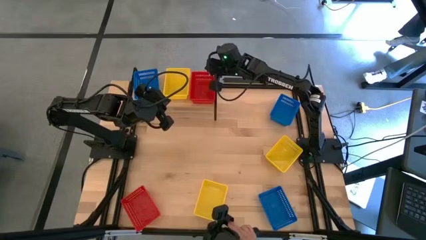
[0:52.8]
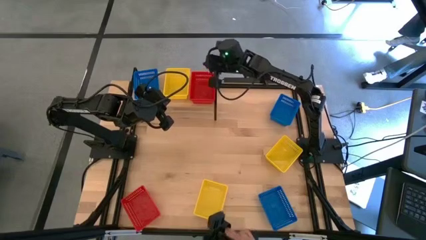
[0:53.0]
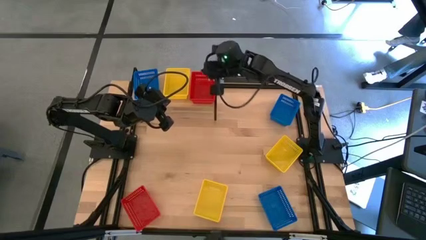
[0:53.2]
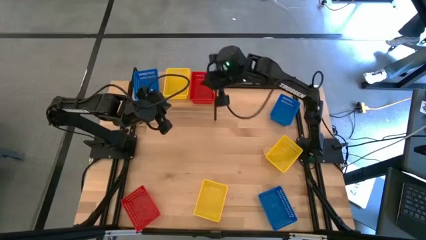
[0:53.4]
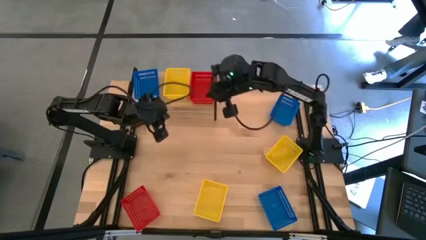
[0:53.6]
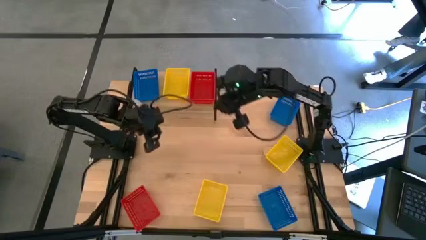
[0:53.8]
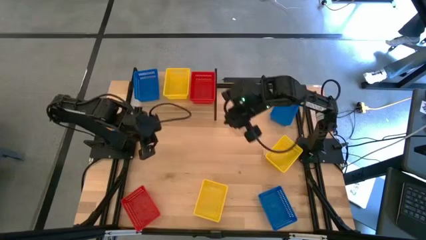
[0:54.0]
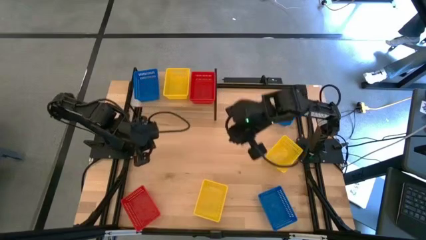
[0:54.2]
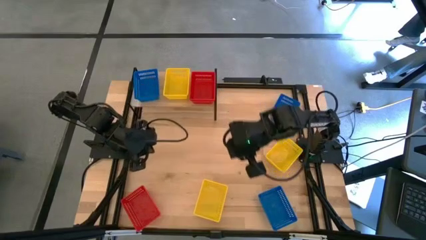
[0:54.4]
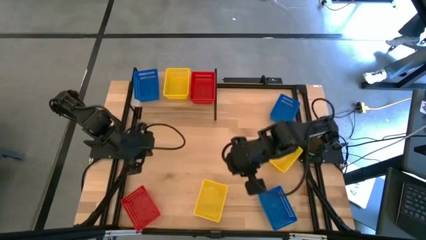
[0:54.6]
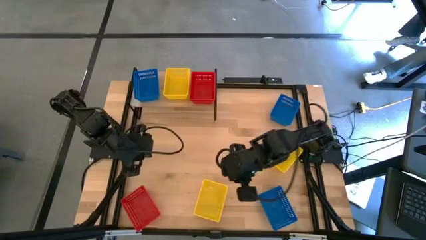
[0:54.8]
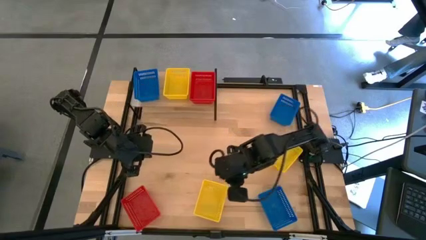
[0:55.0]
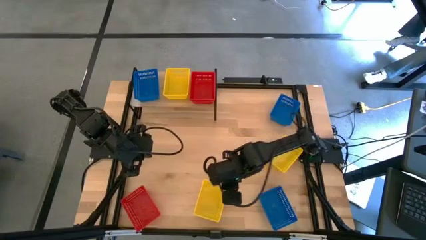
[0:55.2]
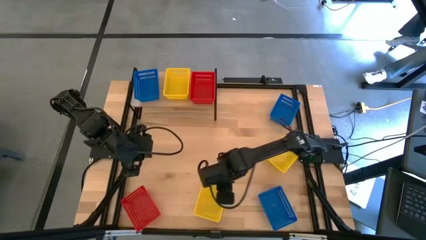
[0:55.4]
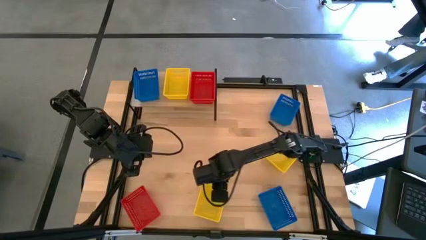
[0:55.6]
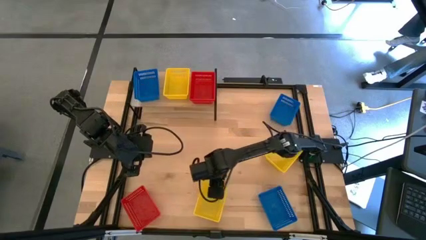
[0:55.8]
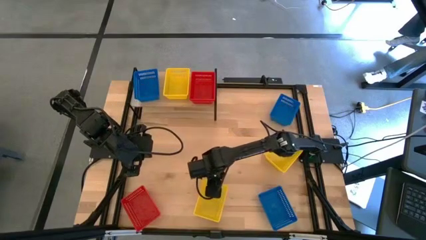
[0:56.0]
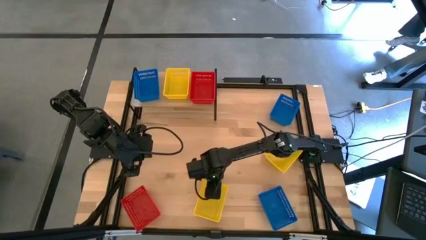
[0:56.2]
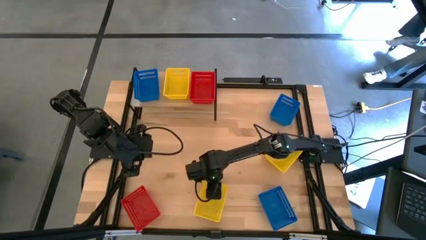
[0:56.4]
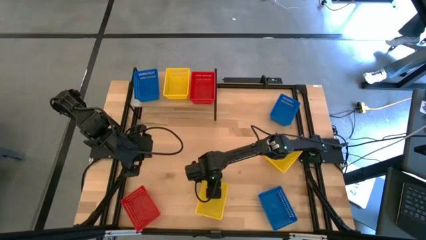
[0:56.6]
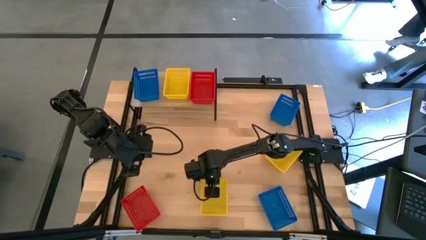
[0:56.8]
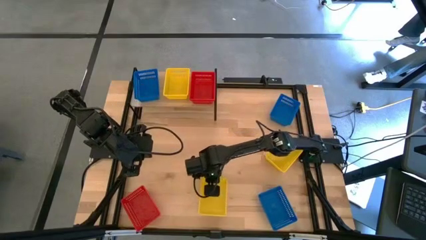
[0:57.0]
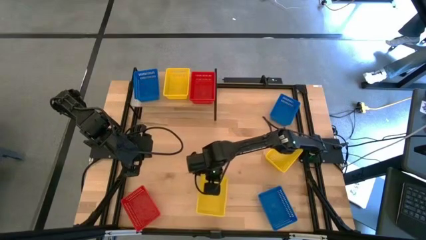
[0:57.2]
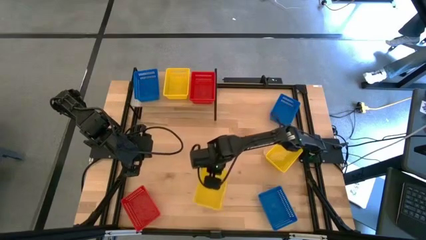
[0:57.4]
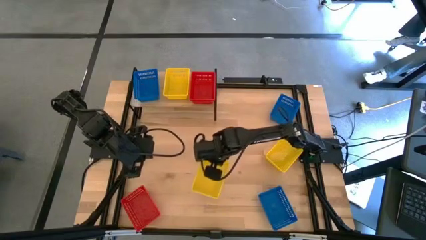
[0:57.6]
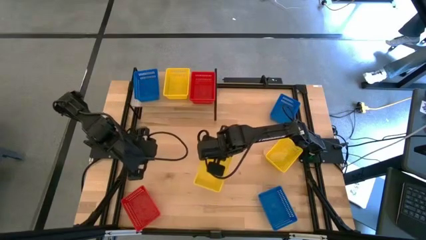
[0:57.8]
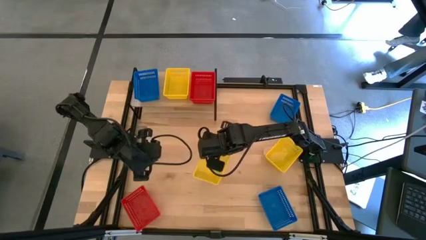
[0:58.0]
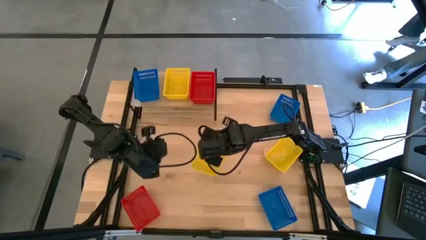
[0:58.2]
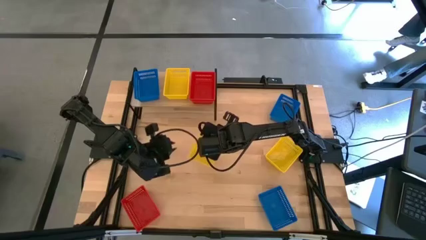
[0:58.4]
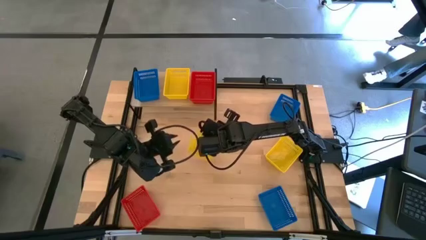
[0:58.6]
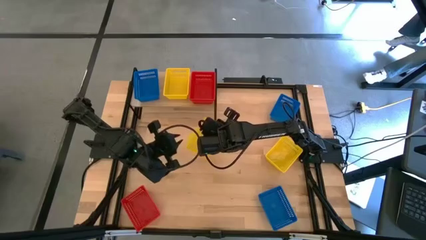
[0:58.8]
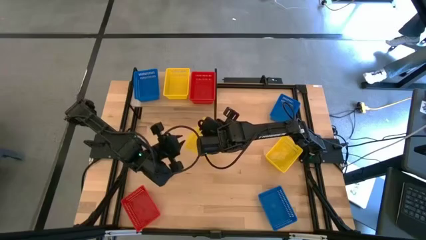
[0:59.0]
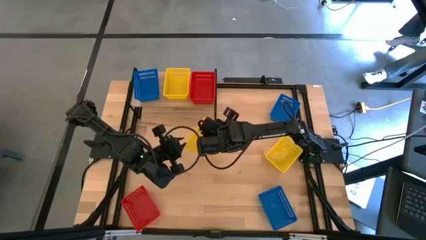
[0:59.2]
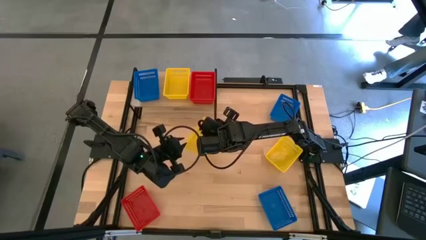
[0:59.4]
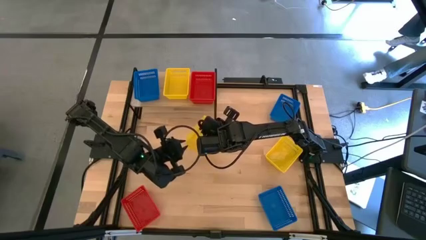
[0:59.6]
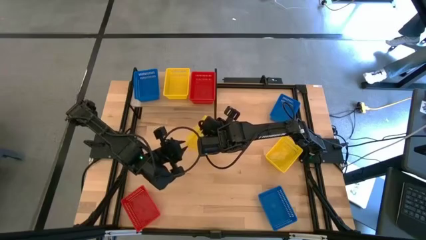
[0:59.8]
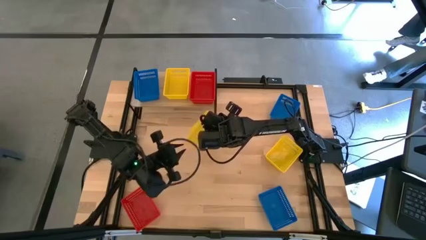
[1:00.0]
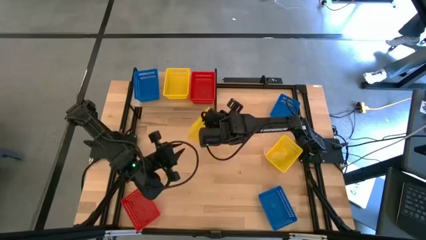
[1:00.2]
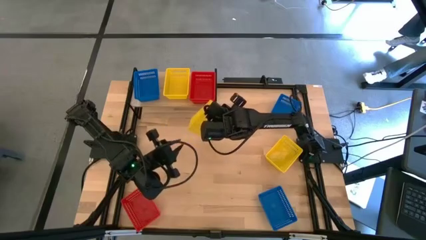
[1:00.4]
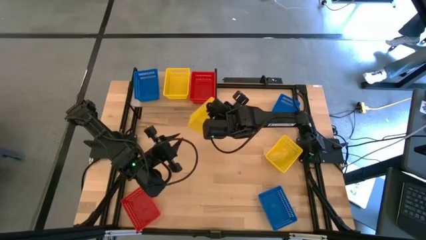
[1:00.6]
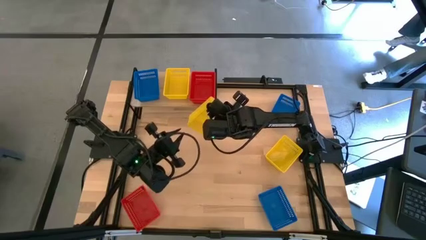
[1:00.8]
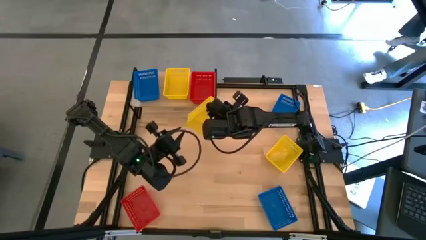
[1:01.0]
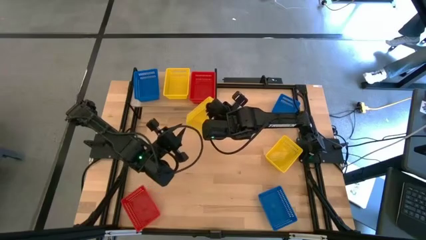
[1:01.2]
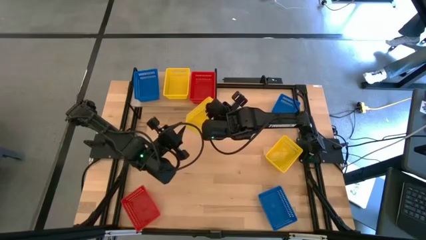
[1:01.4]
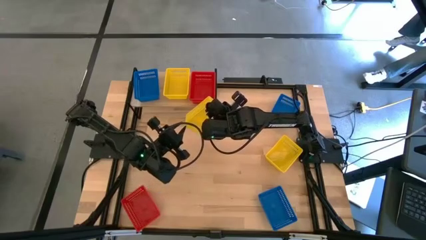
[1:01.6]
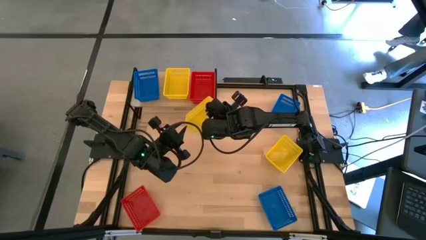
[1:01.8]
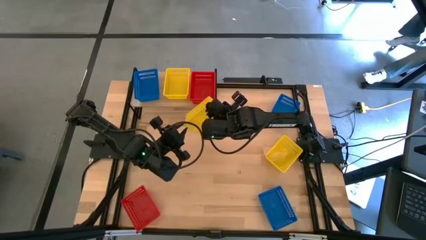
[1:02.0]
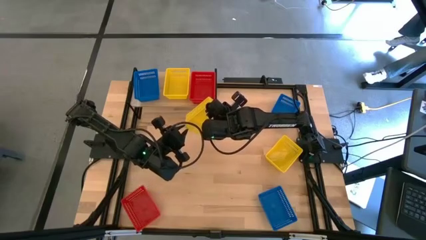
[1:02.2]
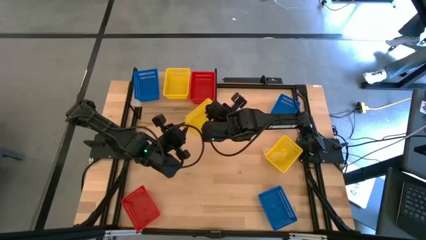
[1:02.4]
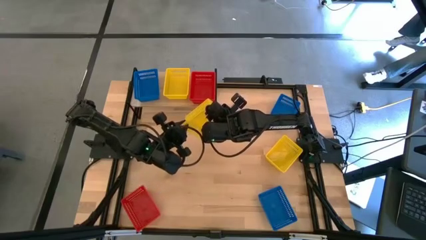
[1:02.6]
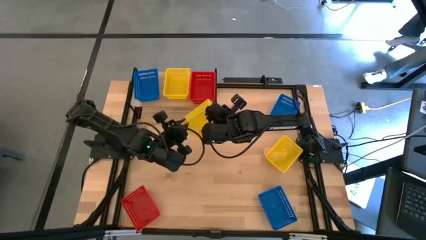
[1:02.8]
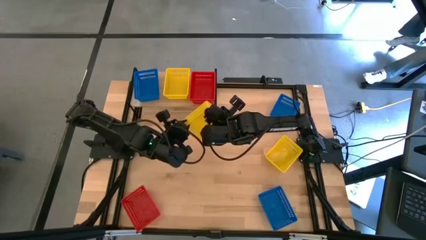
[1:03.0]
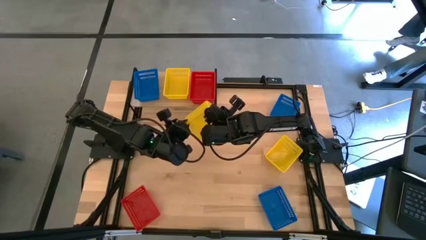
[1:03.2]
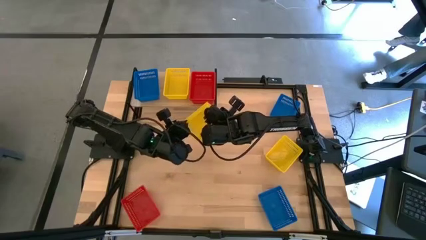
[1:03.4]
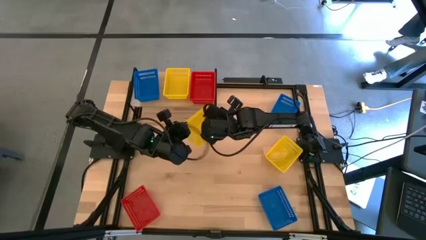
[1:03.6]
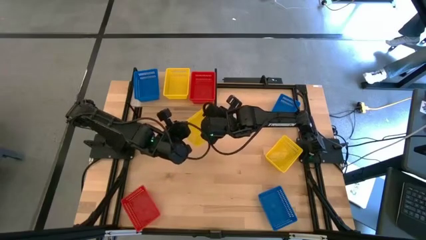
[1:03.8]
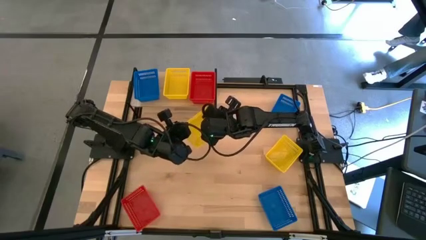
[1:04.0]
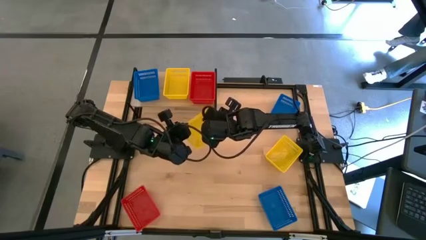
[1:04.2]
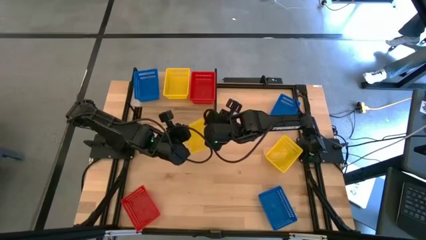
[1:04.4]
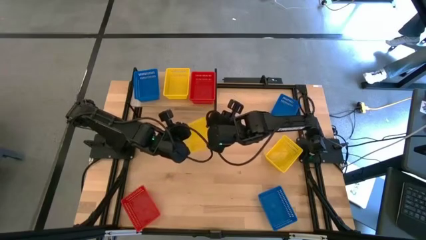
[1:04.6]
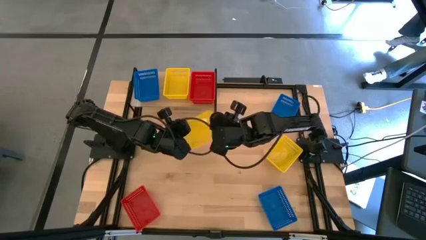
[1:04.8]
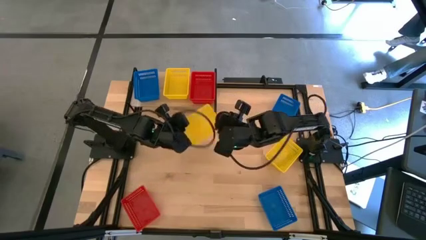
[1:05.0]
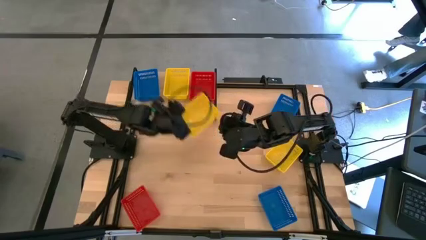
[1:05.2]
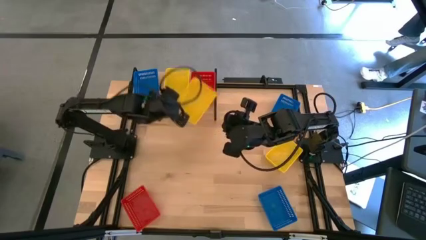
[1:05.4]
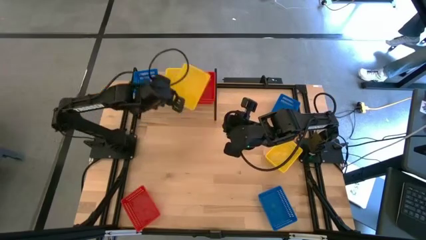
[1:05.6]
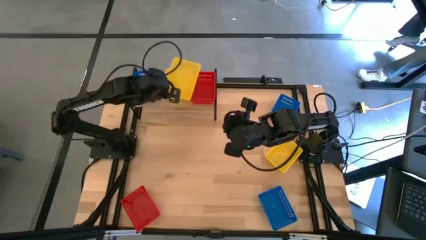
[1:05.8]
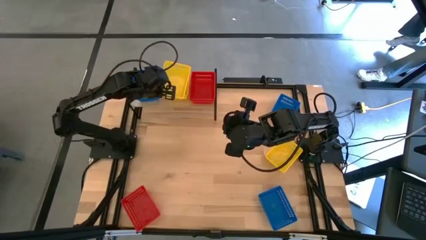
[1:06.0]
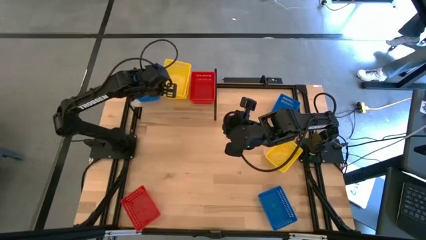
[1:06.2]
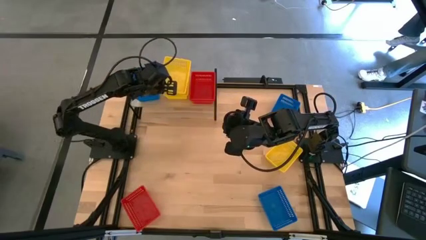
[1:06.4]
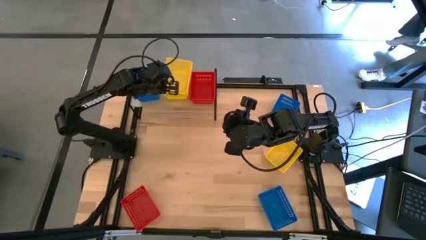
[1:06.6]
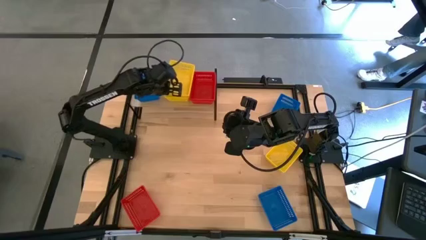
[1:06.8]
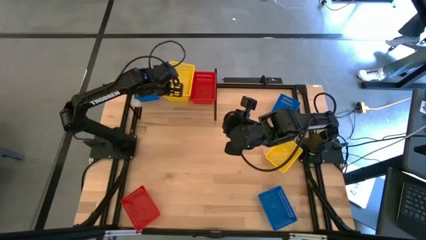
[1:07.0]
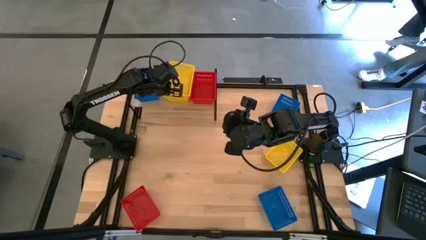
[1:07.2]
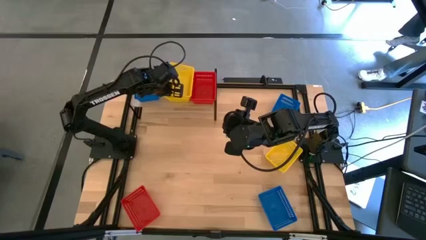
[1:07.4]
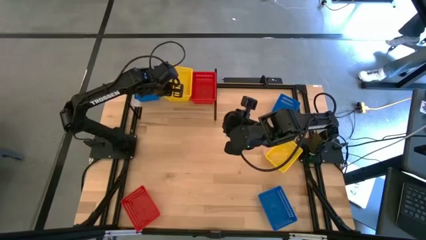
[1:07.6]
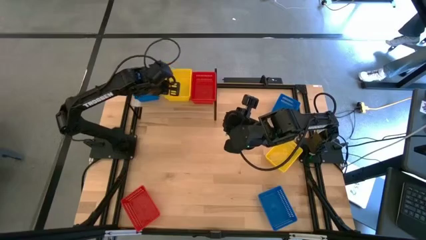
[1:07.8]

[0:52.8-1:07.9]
Task: Stack baskets on shelf by color
Stack the bottom yellow bin on top of the yellow bin on the shelf
